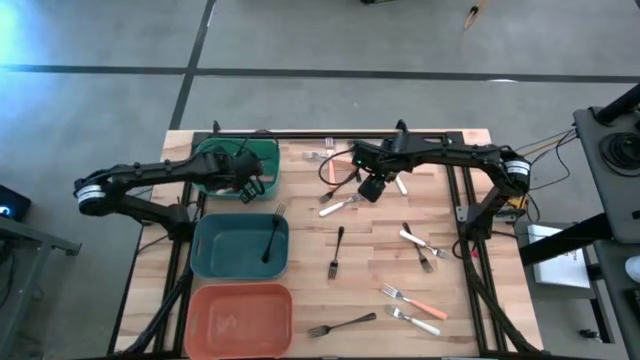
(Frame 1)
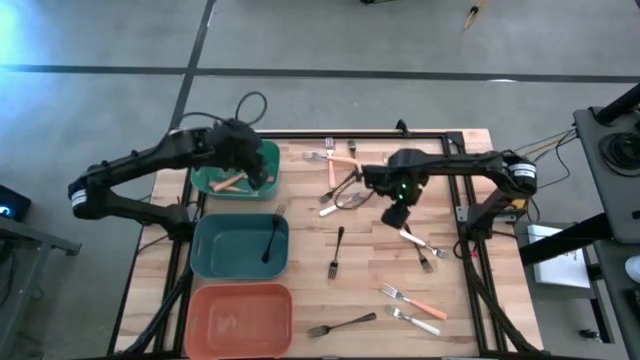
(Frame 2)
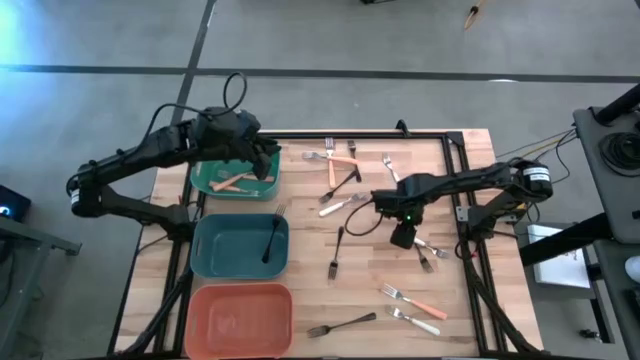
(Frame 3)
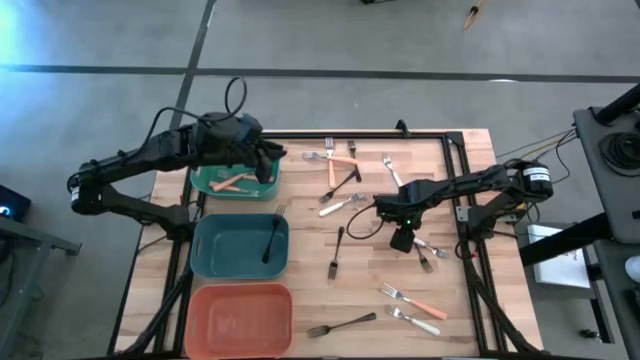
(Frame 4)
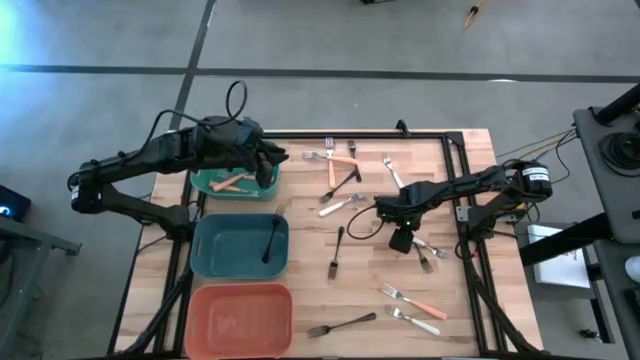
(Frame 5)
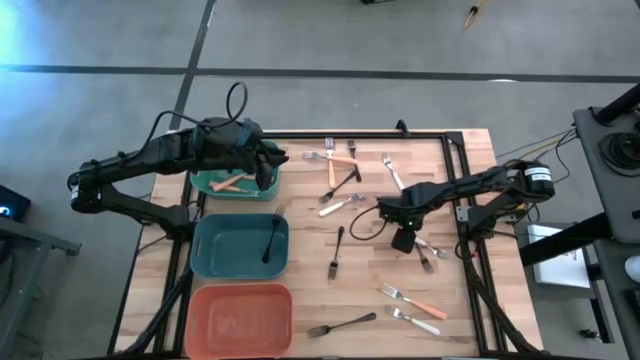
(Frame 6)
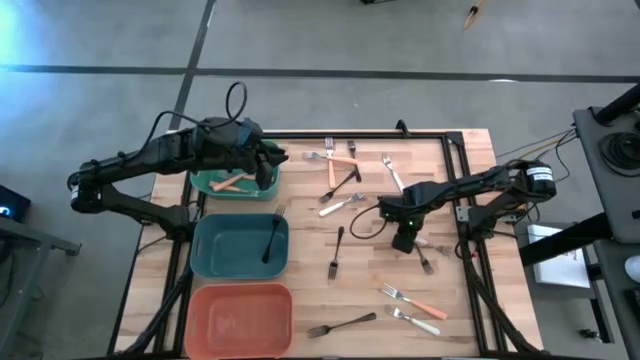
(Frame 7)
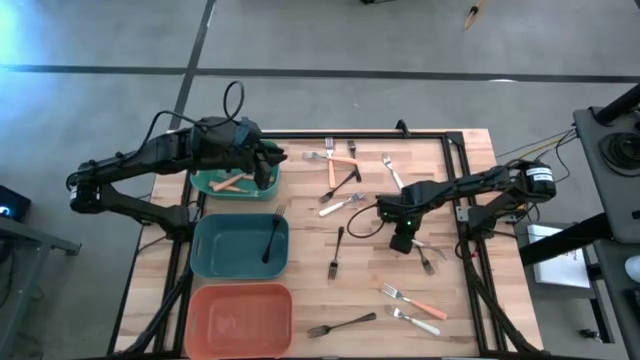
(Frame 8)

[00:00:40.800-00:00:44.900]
Task: Sort silverware by color (type)
Put the white fork into the orange bin

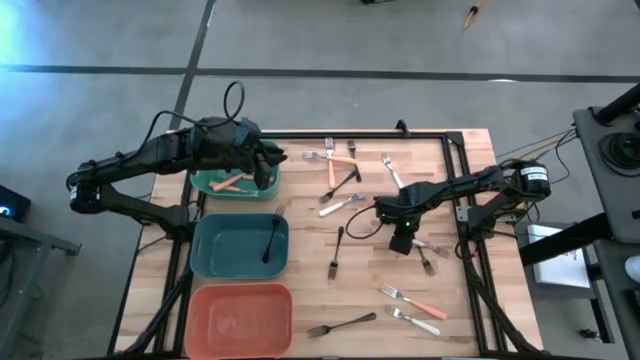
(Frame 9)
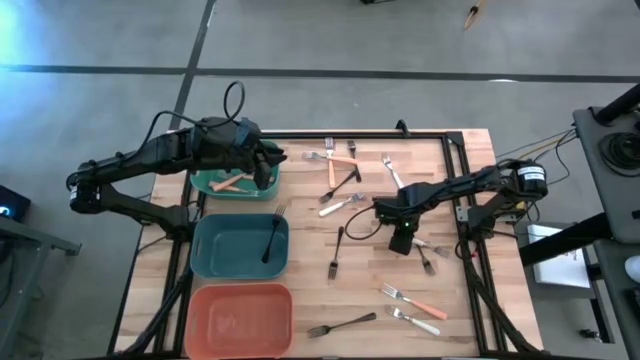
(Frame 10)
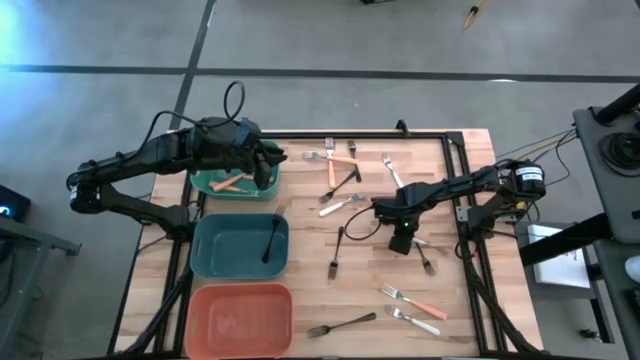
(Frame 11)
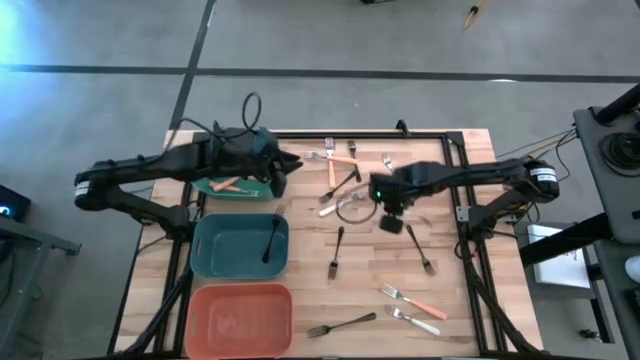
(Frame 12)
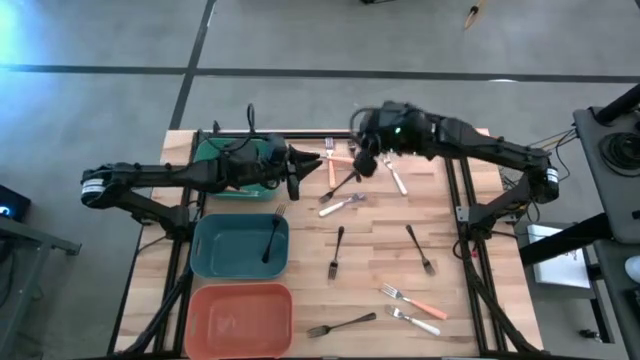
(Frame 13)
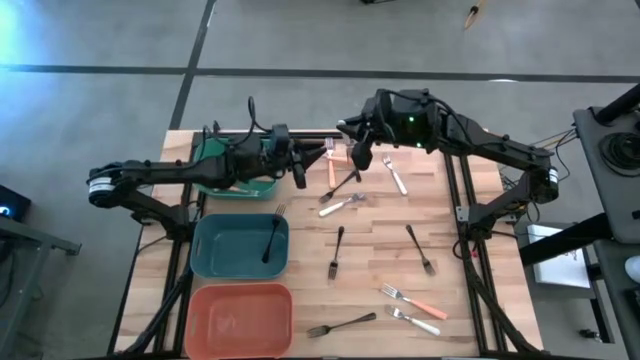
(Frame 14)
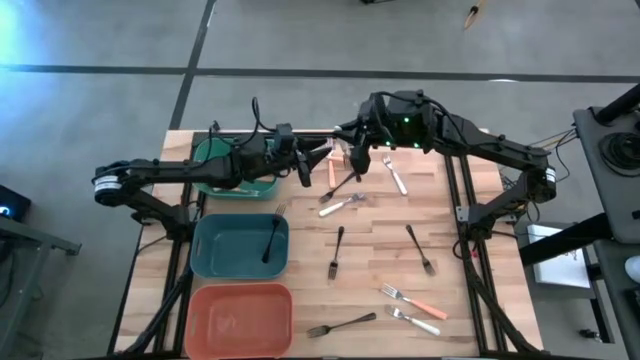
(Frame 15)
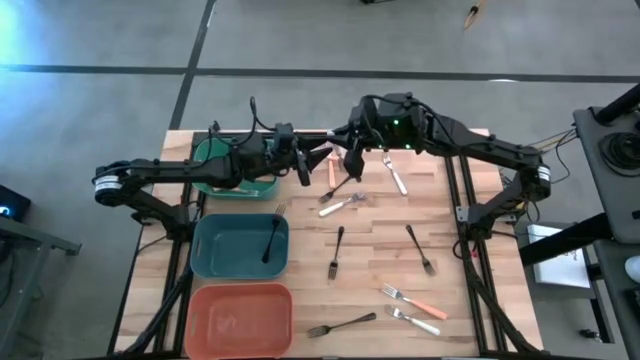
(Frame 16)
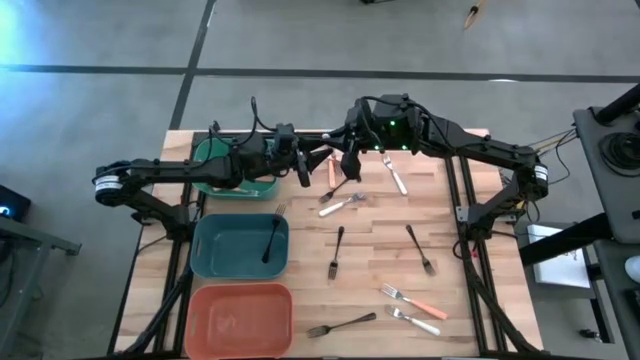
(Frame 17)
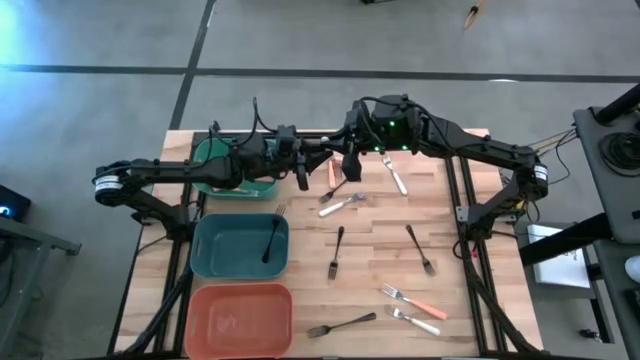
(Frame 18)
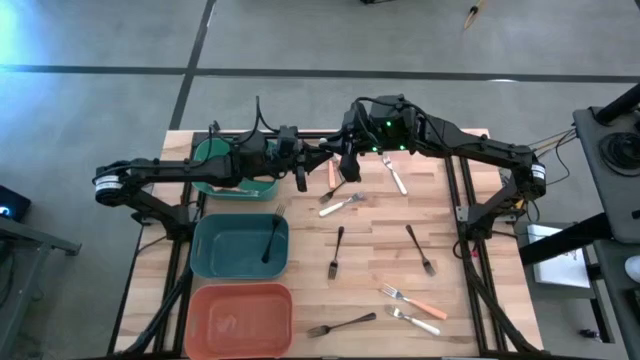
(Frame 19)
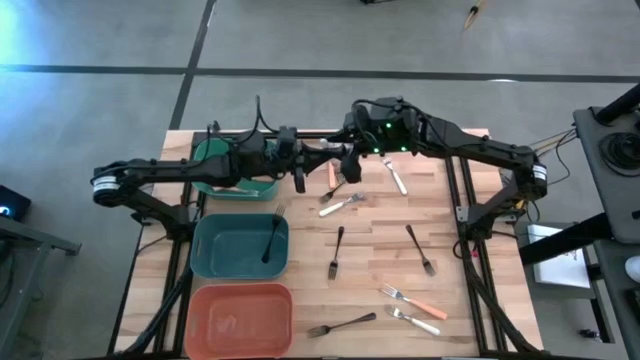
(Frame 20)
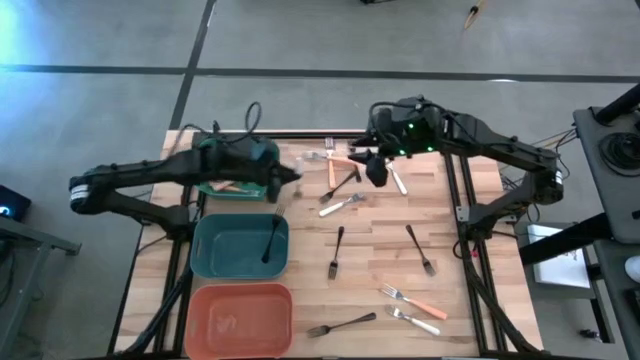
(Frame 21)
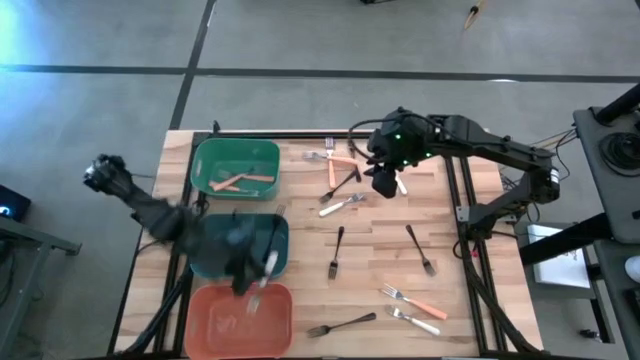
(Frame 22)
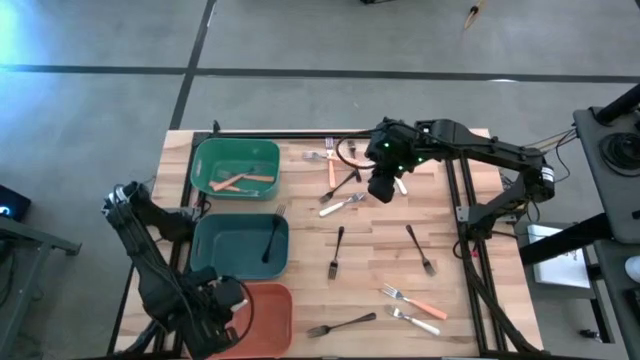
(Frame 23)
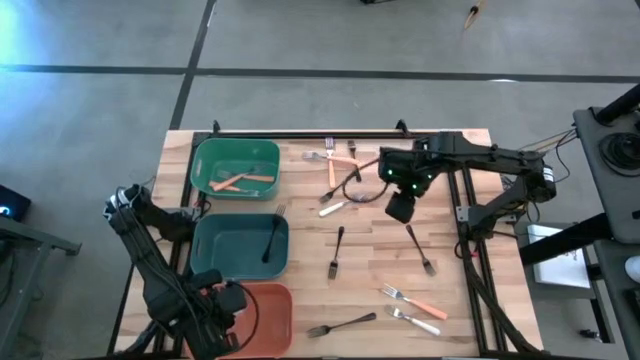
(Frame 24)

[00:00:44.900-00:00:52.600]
Put the white fork into the orange bin

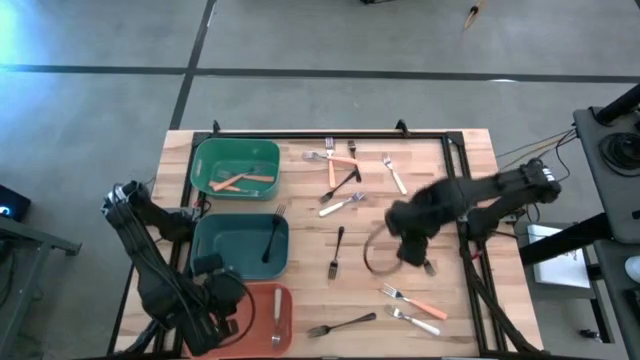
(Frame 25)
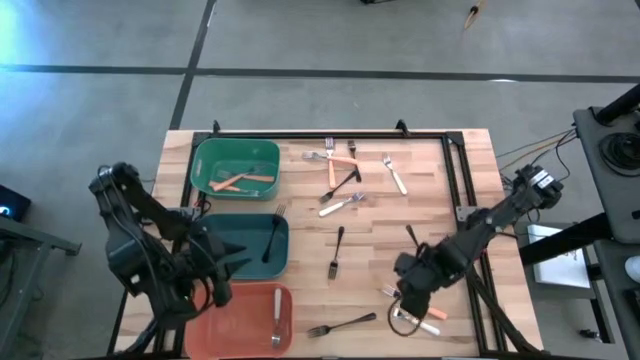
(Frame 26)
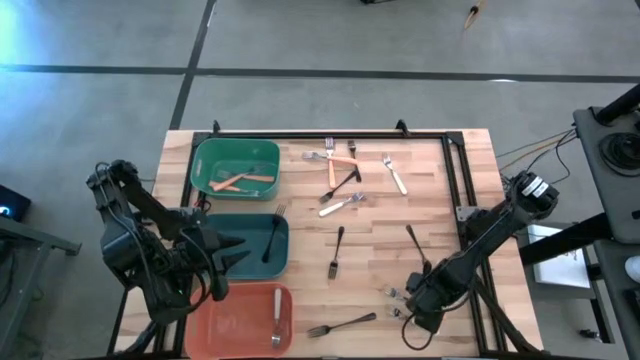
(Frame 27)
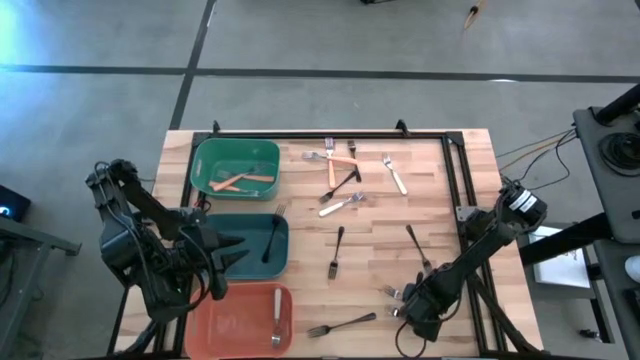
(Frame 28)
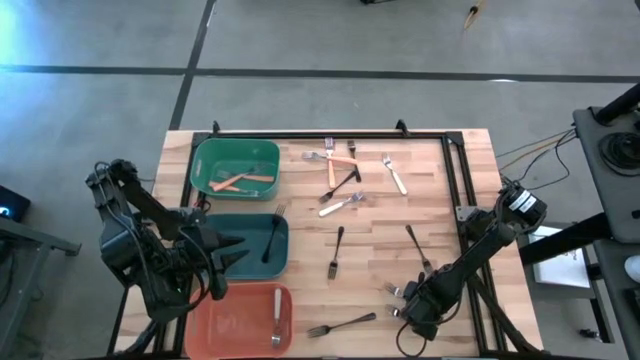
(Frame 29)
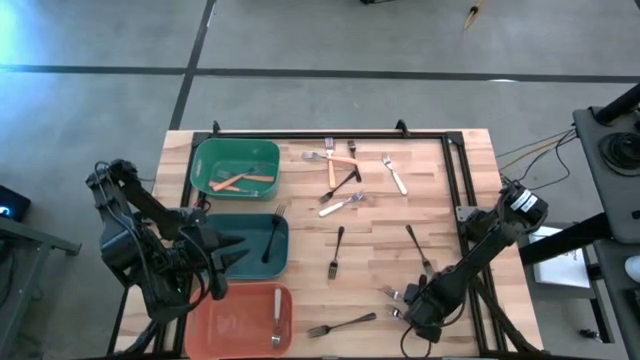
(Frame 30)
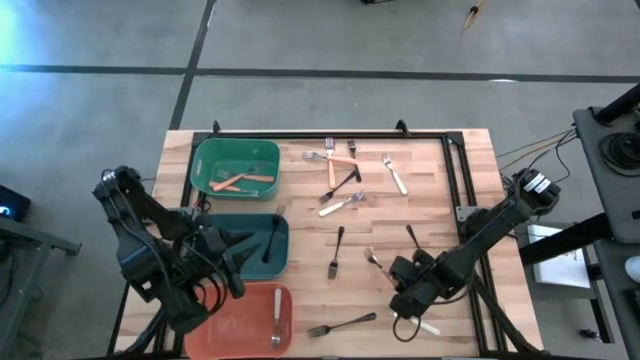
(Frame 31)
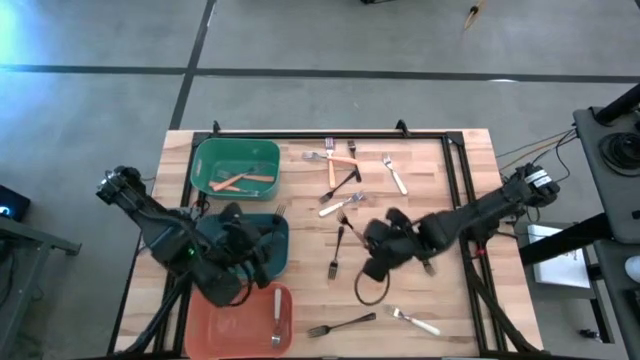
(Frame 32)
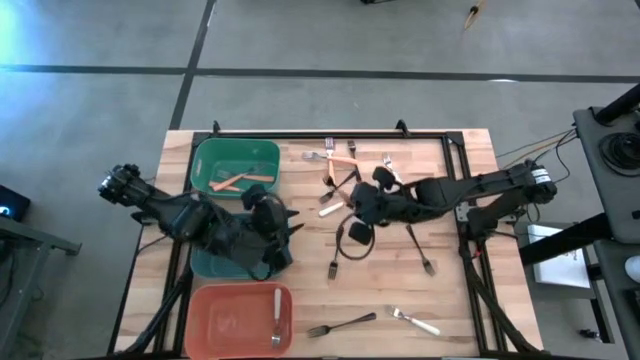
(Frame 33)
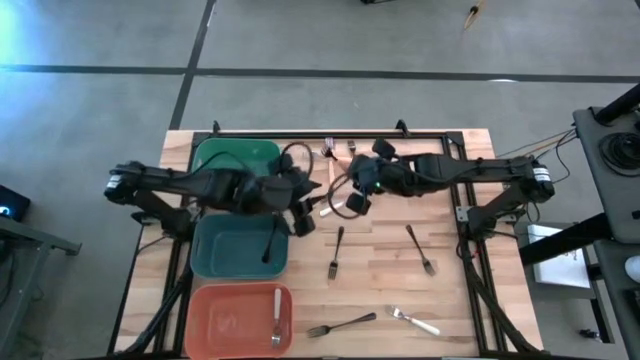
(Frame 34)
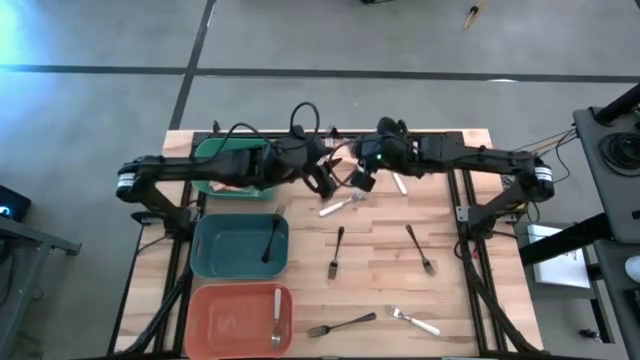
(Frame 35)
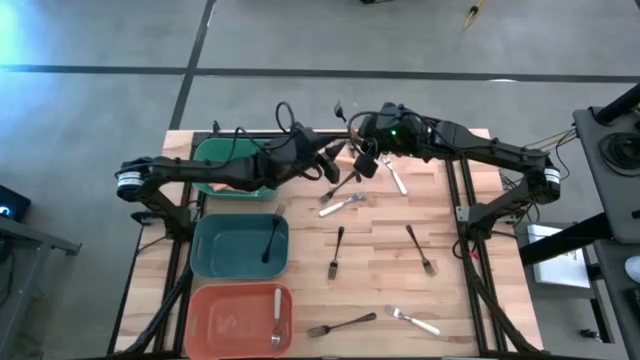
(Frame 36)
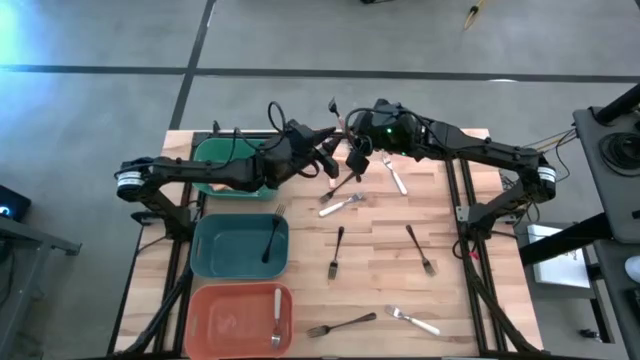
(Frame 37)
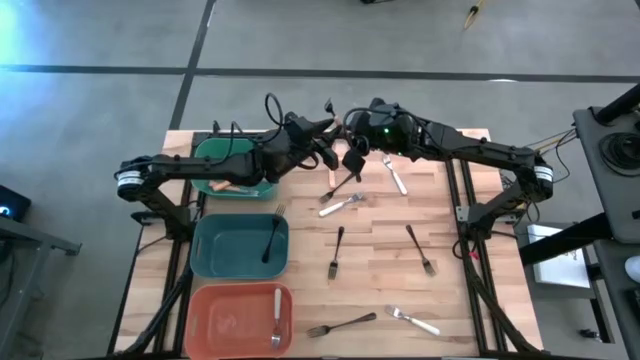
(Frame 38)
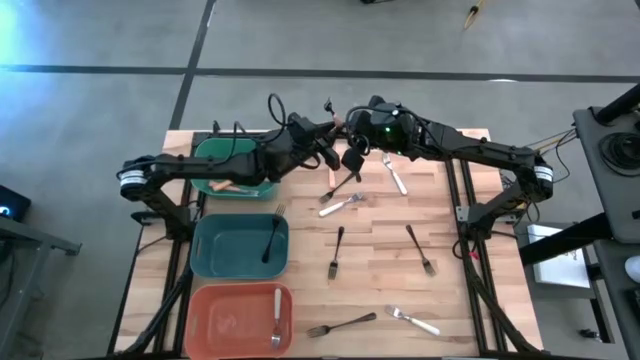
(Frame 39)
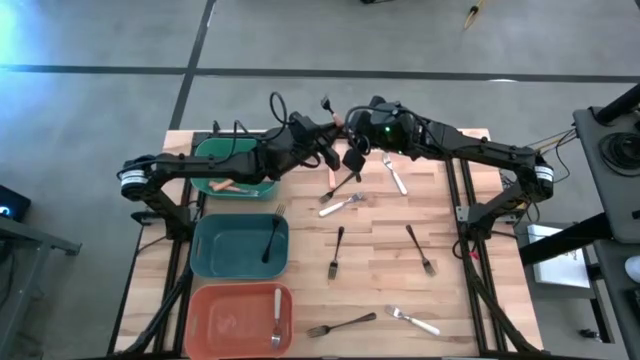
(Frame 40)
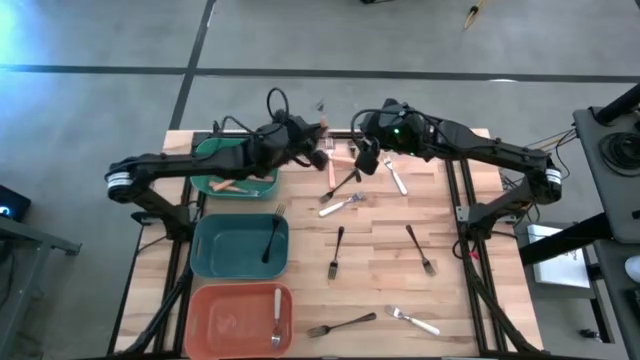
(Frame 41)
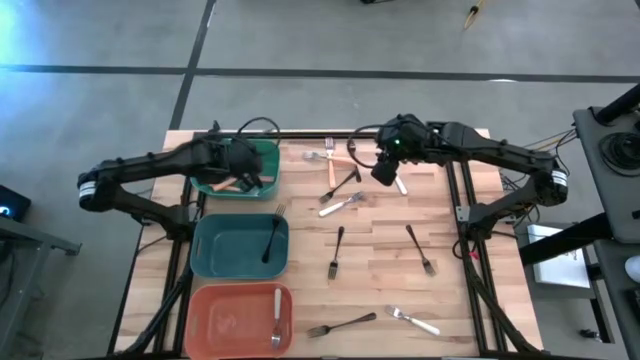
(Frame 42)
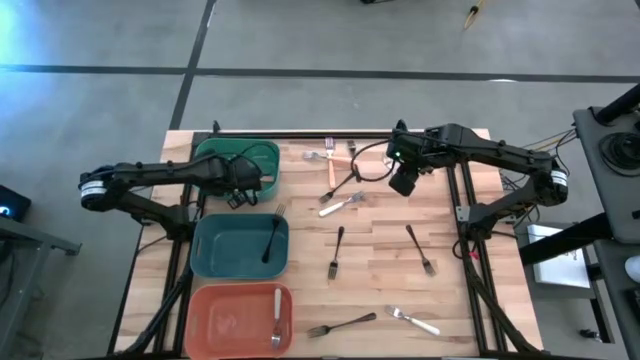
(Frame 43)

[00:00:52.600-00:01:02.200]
Put the orange fork into the green bin
